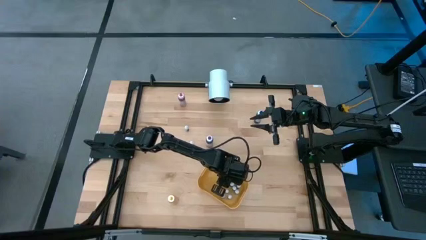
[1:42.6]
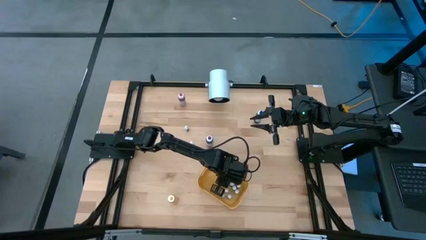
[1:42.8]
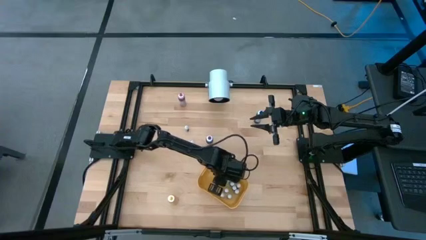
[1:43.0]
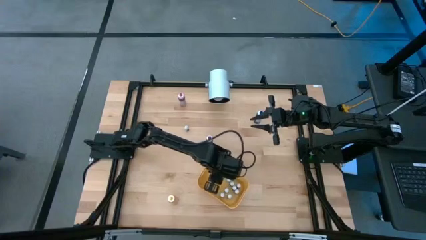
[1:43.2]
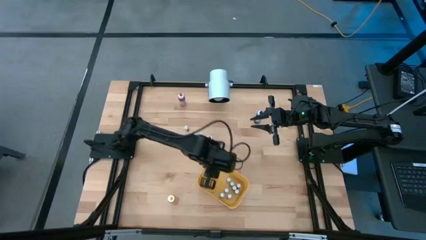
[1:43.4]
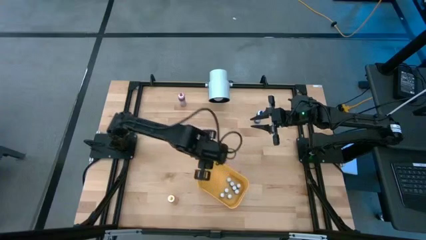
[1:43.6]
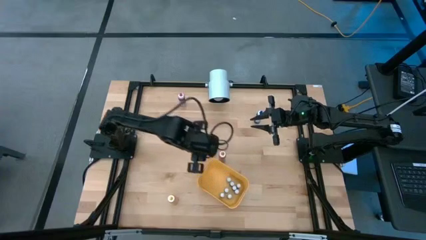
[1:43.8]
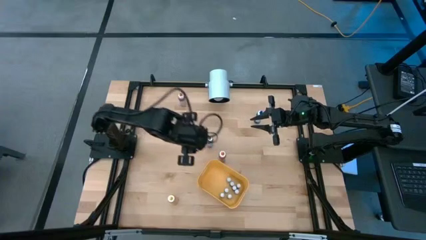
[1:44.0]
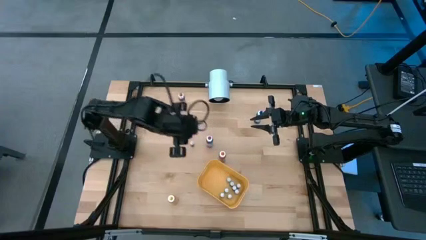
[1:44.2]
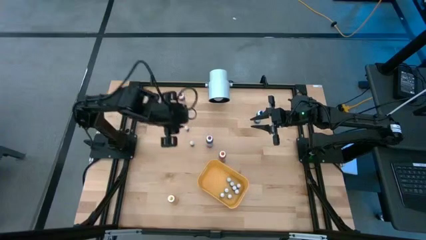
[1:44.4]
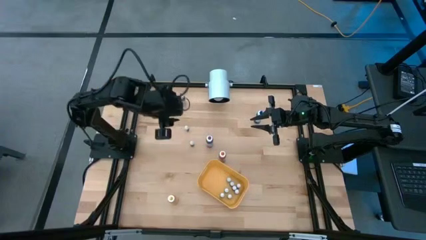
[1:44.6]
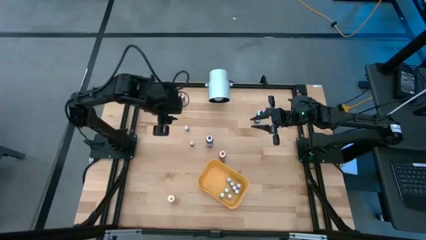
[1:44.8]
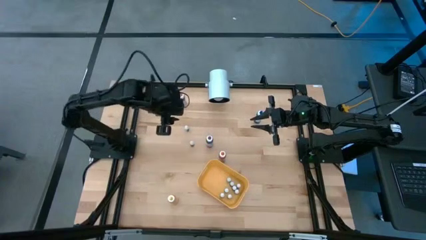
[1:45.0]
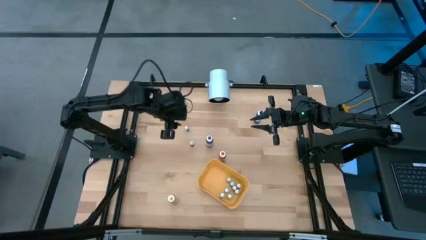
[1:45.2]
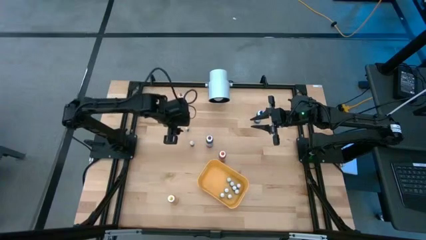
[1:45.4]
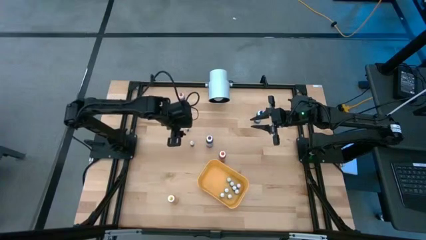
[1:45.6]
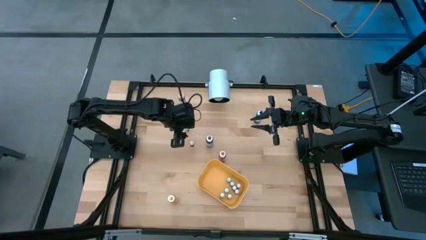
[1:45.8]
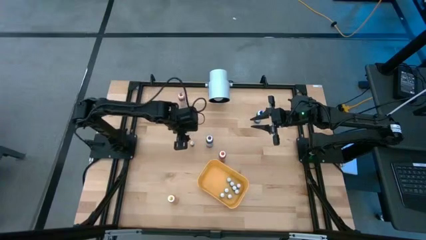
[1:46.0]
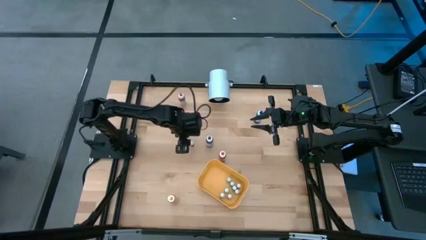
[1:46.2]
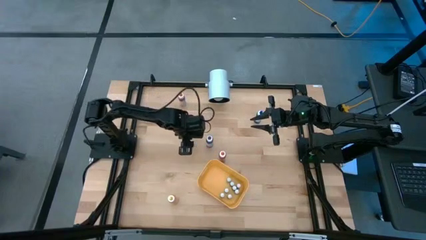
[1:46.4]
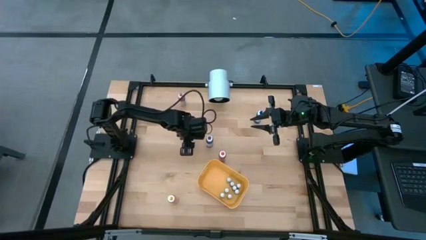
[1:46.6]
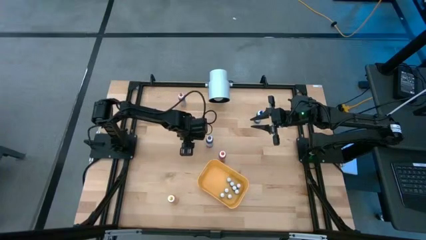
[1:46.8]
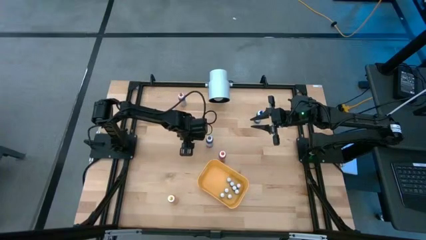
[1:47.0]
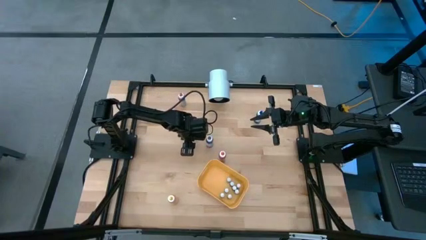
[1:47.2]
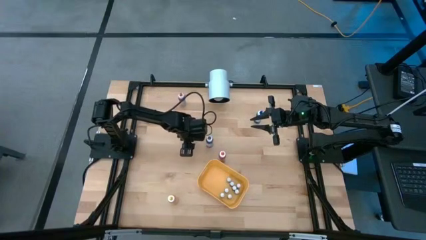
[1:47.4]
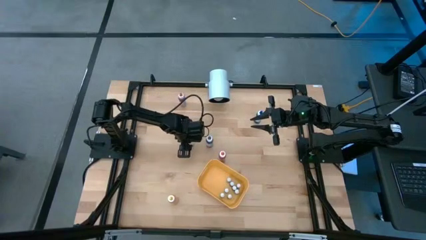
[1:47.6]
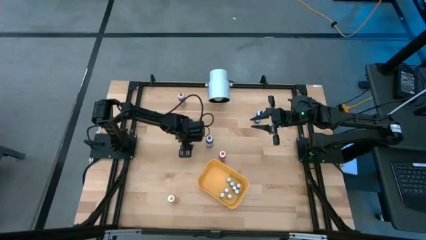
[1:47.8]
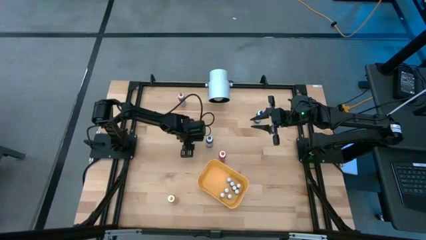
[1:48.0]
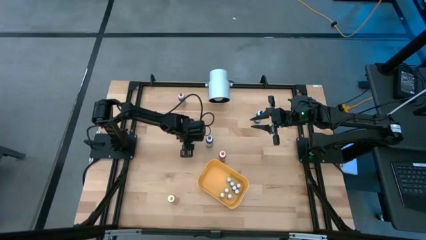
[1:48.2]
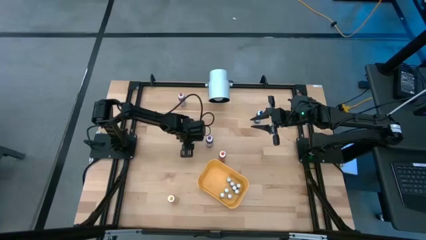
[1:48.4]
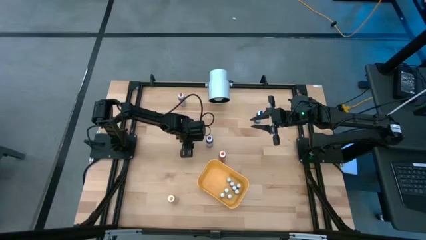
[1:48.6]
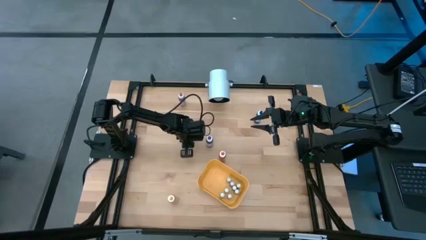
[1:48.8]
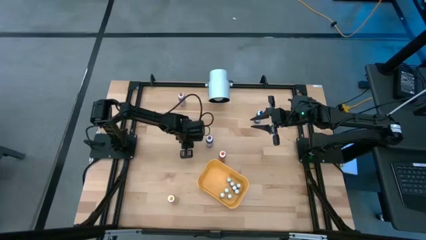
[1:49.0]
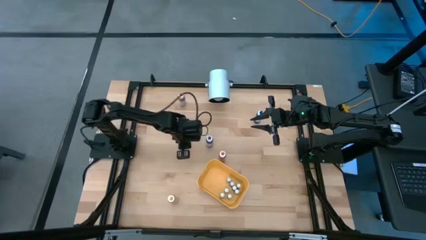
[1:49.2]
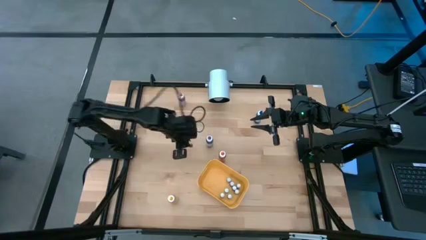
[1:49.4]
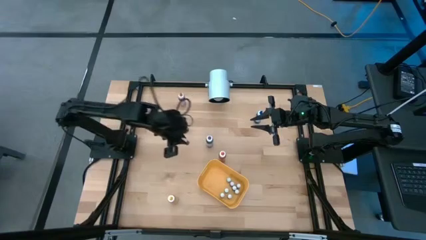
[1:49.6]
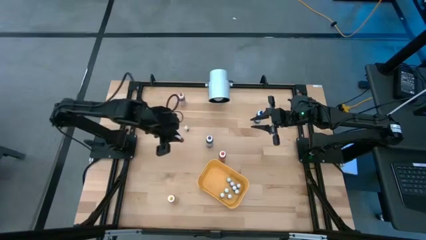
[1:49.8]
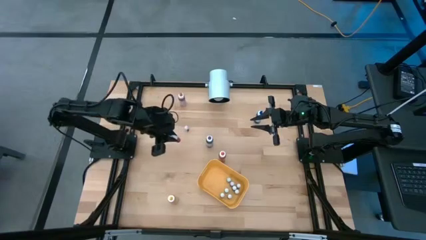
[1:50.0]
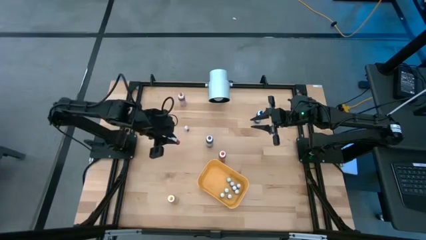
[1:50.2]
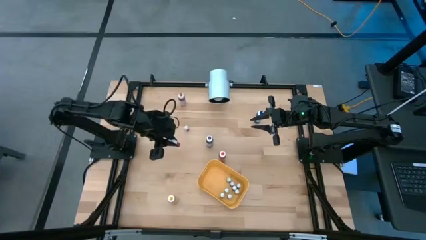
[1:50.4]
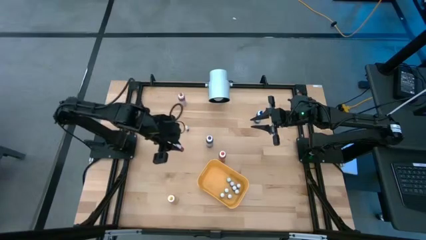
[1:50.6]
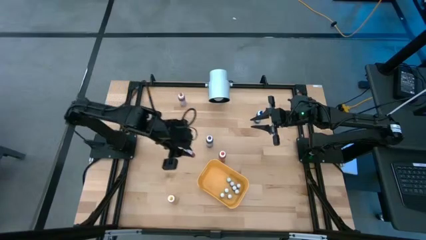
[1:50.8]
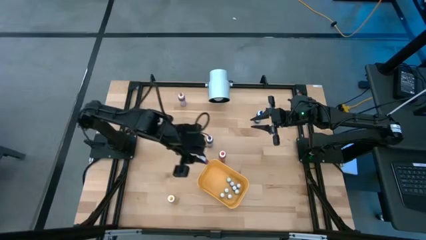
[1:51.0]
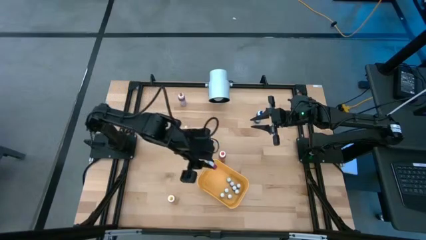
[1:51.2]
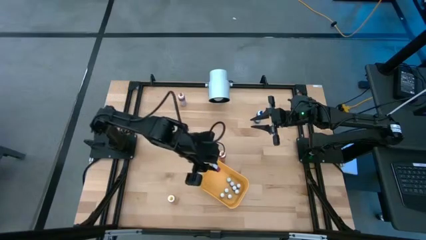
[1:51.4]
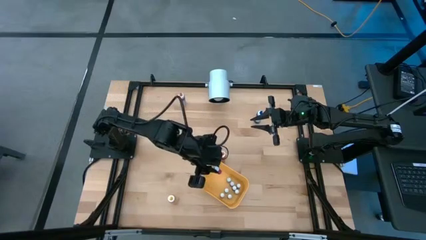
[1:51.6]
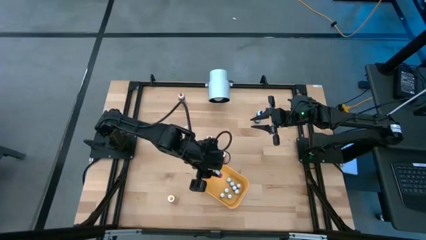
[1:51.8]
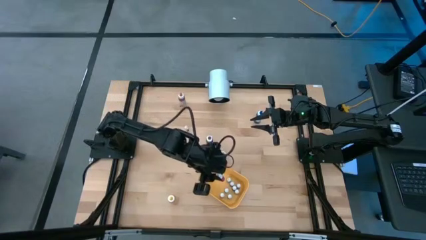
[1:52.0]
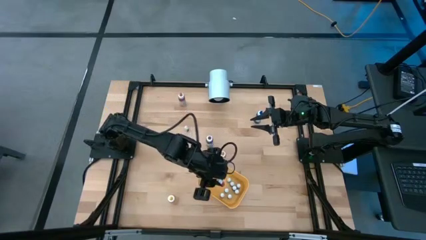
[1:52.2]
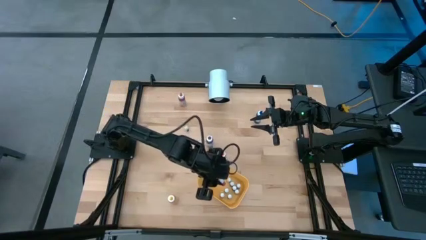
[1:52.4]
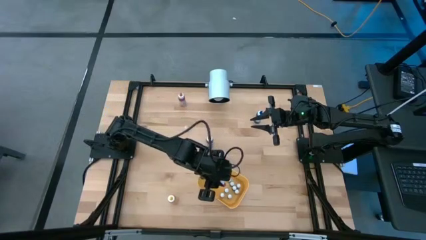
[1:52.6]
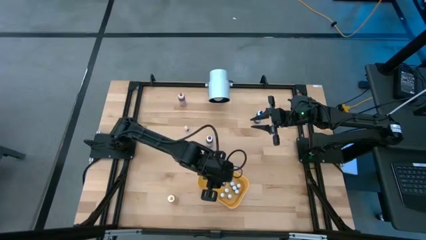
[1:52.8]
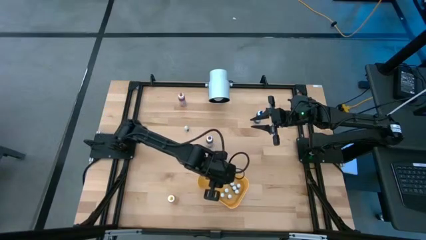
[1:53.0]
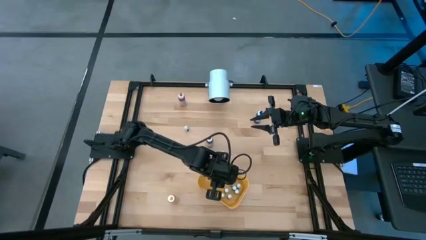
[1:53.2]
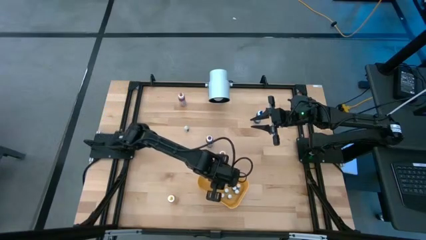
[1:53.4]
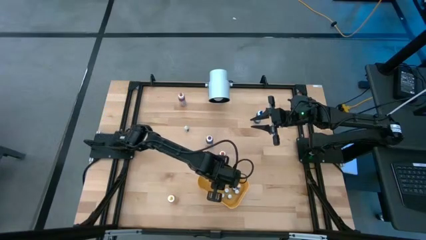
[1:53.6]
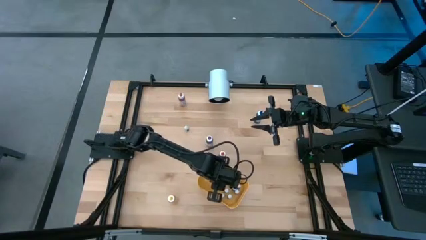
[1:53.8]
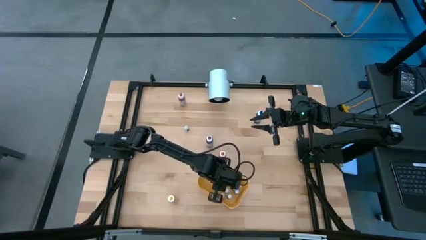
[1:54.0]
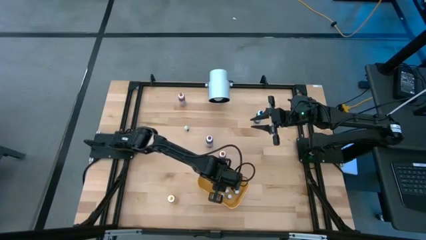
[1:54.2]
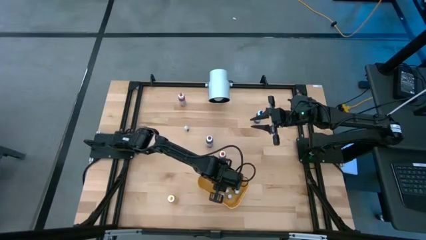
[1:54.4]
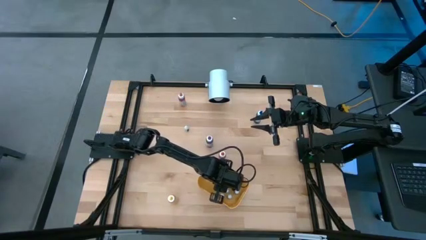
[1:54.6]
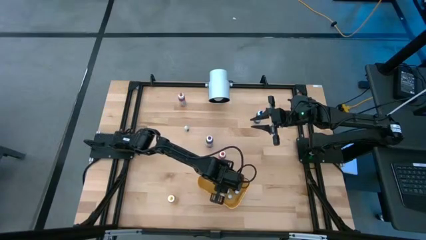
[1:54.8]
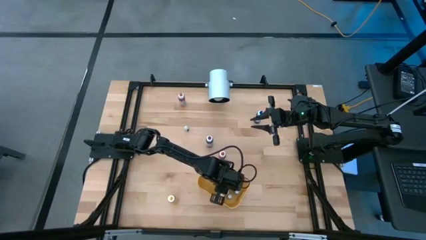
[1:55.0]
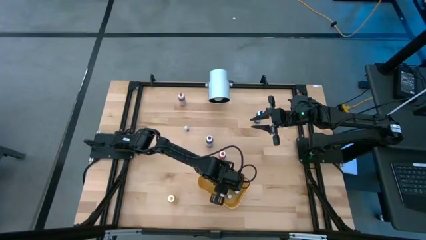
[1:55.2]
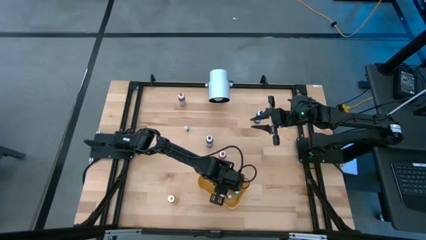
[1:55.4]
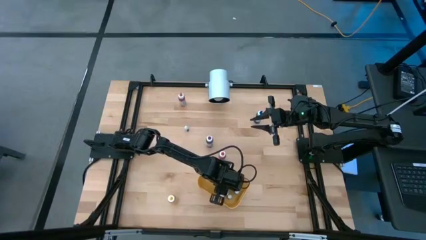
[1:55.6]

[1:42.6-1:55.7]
Task: Pick & Place food coloring
Put the small pink food coloring bottle into the yellow container
